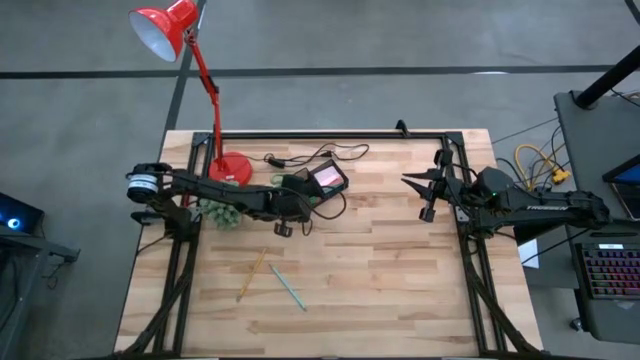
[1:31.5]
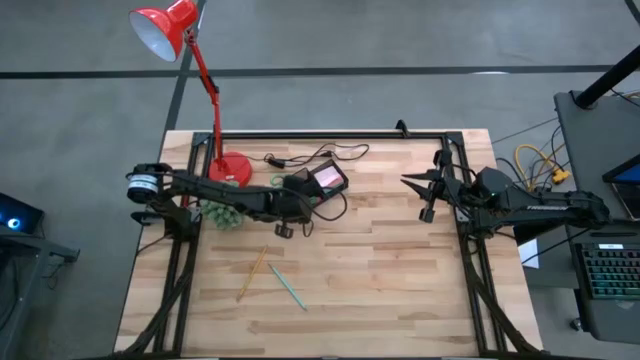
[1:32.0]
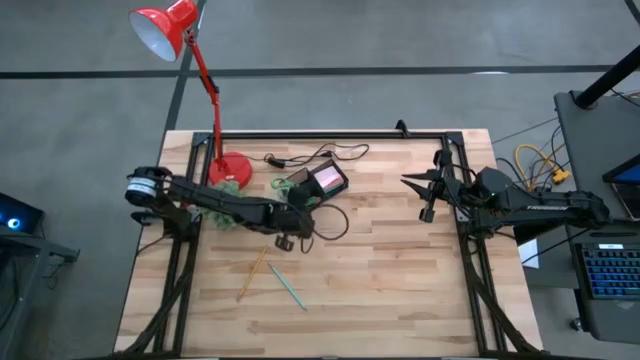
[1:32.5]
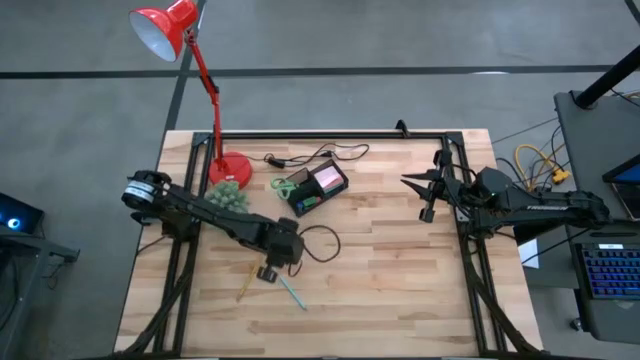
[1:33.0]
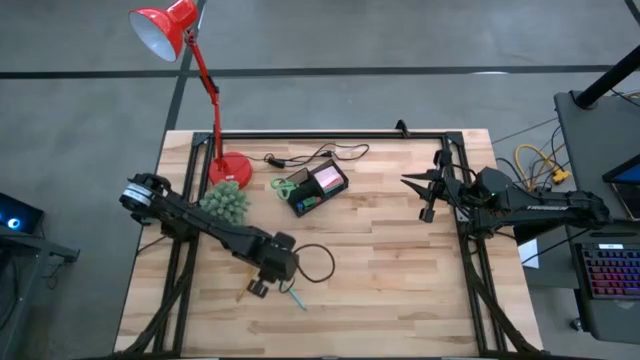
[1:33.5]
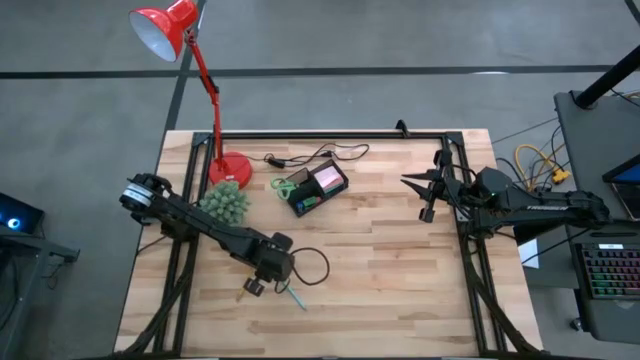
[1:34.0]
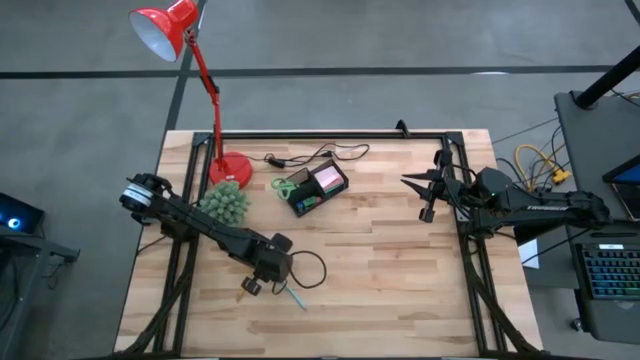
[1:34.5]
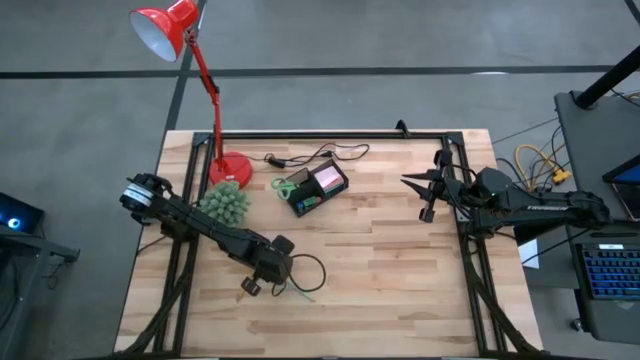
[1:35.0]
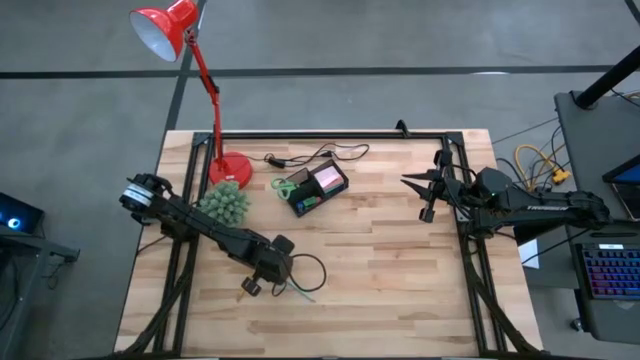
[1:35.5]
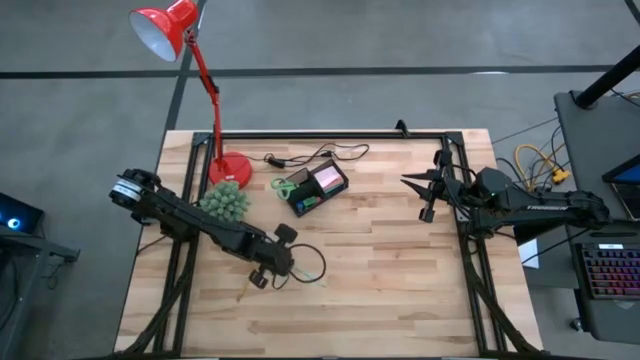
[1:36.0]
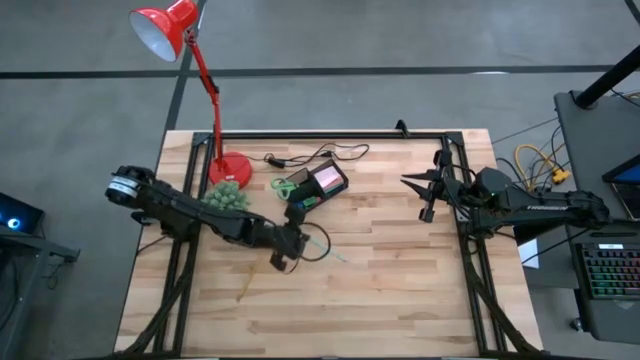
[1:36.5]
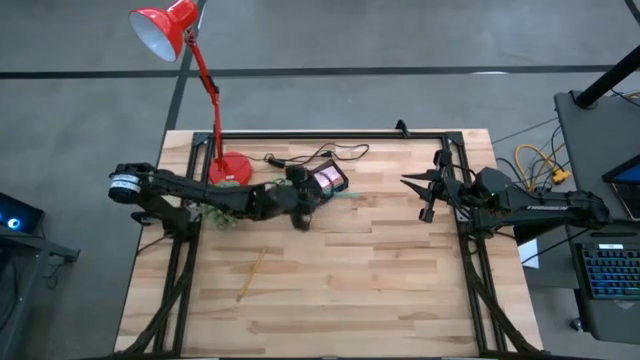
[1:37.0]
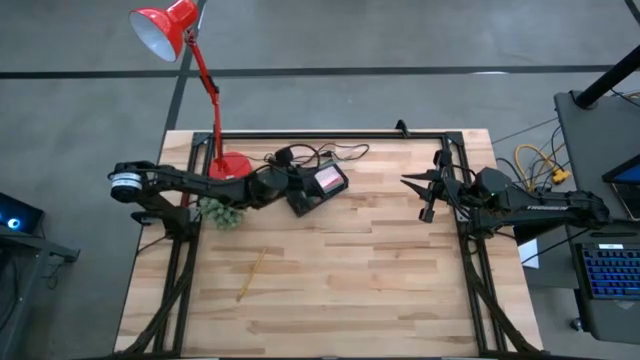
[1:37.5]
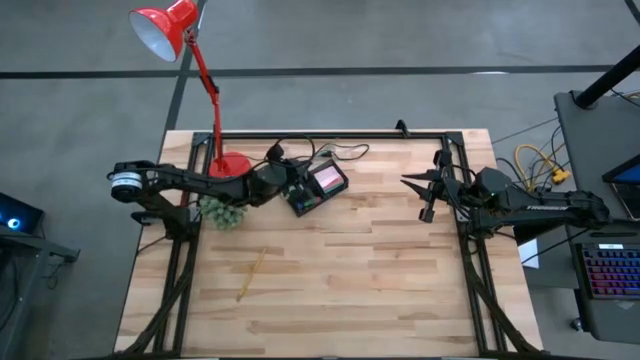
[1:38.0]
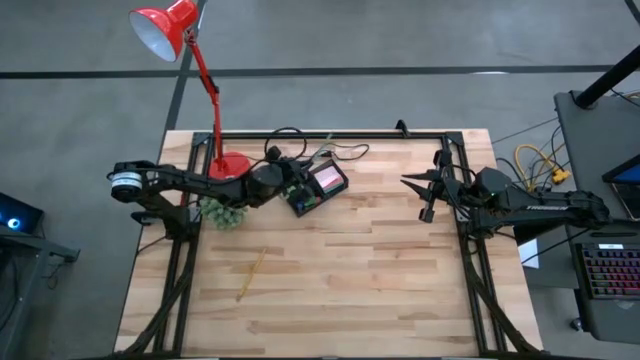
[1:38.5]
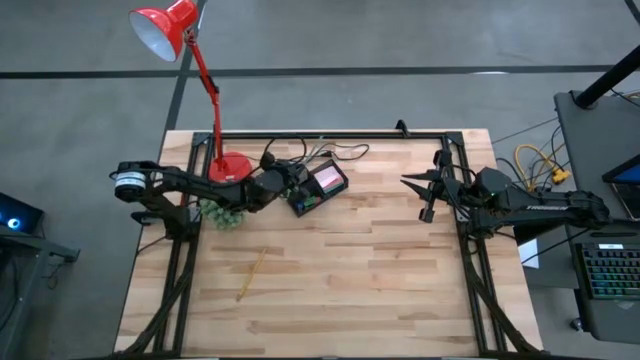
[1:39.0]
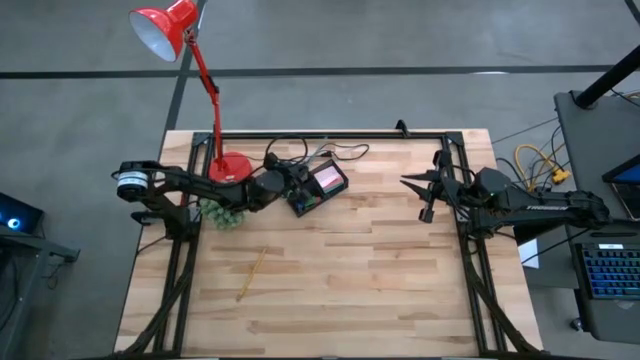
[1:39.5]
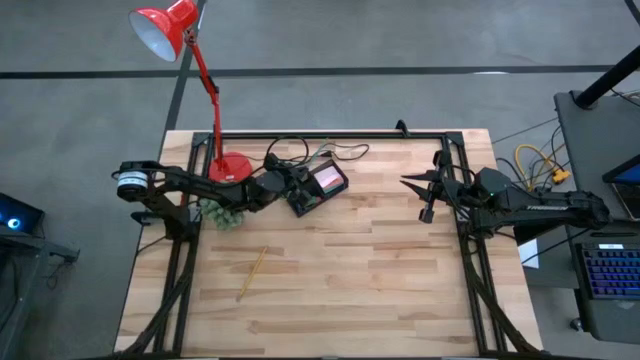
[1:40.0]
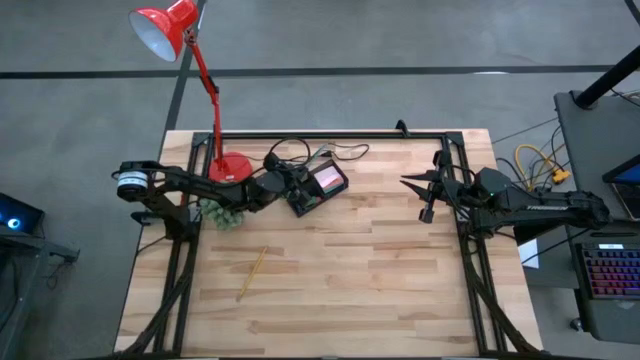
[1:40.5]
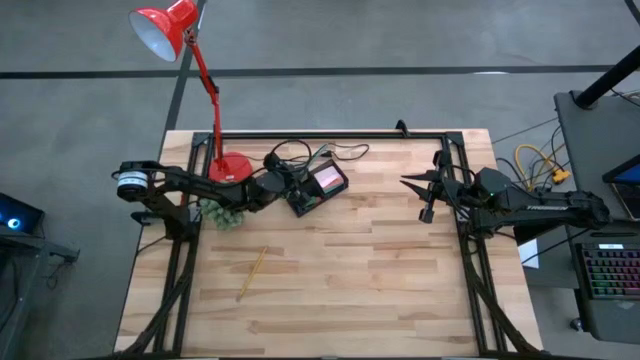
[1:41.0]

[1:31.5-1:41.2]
Task: Pick and place office supplies into organizer
Put the blue pencil into the black desk organizer

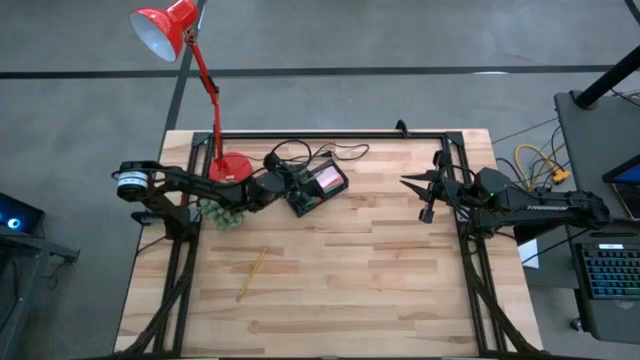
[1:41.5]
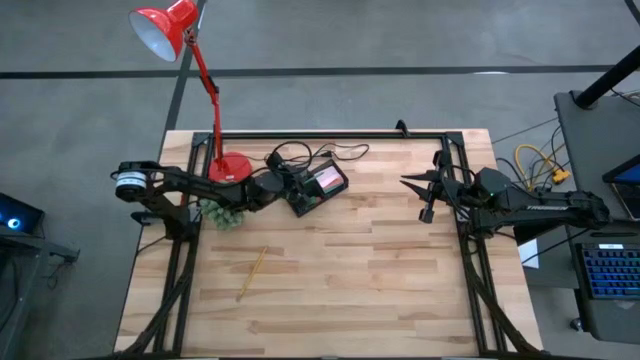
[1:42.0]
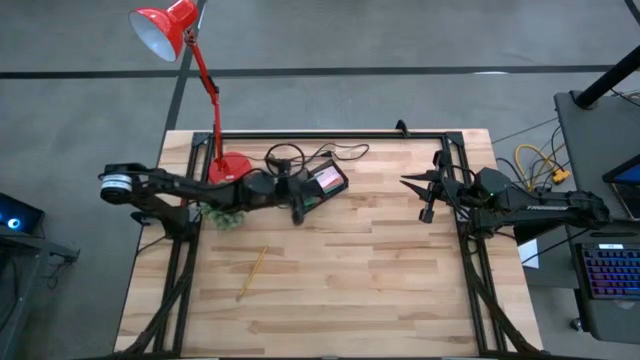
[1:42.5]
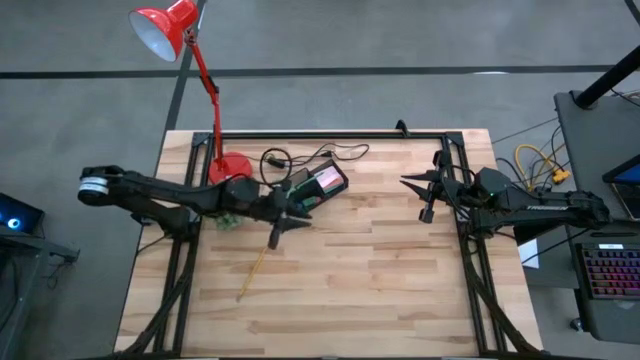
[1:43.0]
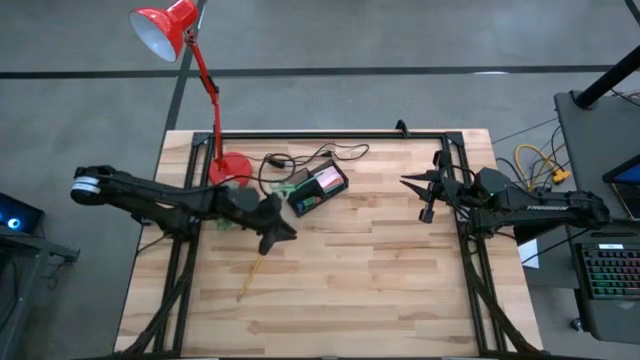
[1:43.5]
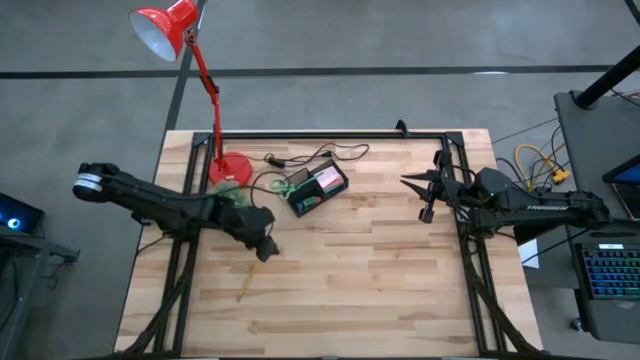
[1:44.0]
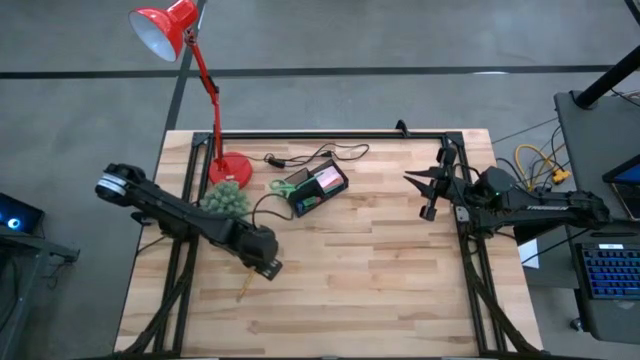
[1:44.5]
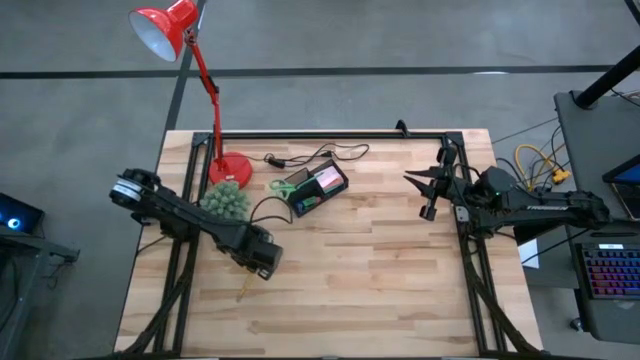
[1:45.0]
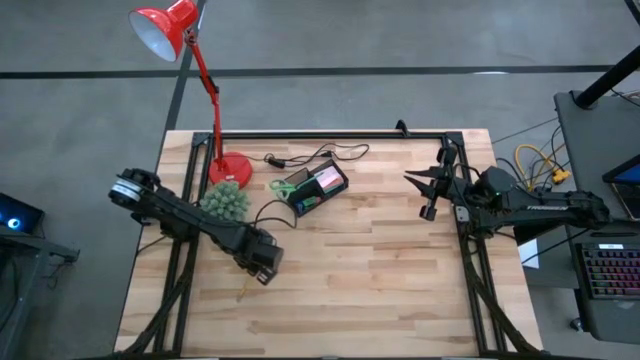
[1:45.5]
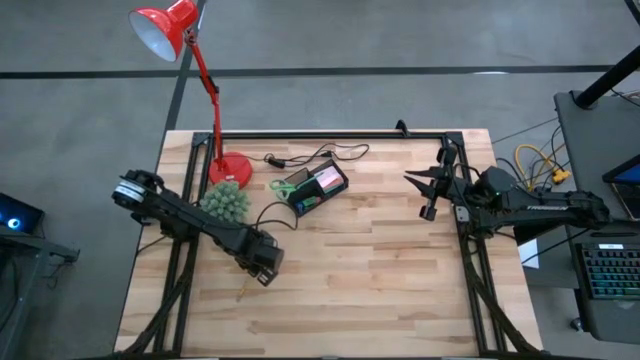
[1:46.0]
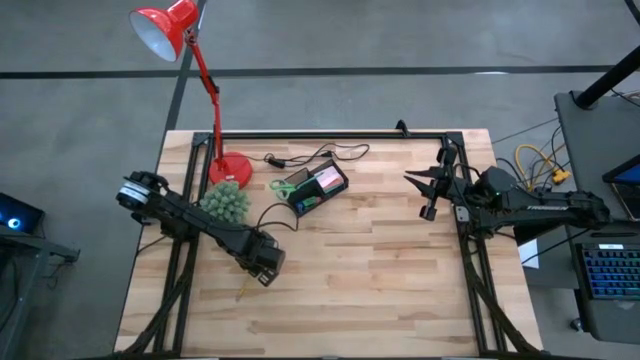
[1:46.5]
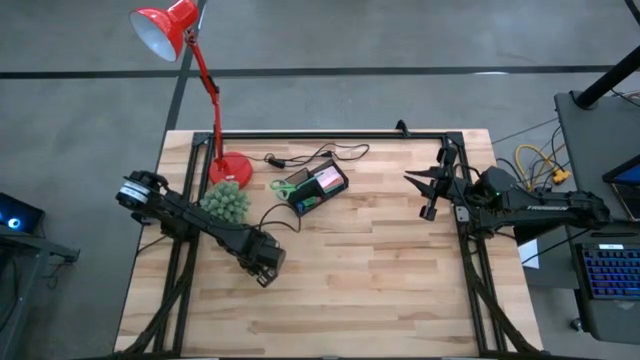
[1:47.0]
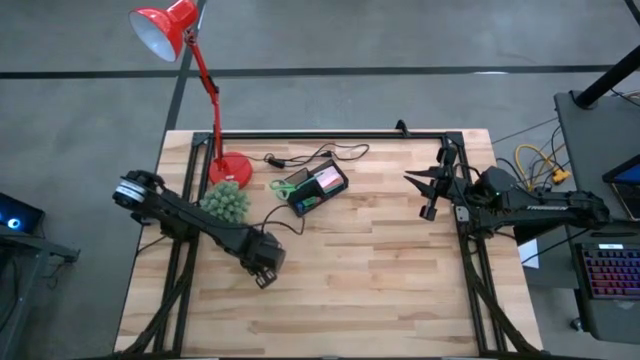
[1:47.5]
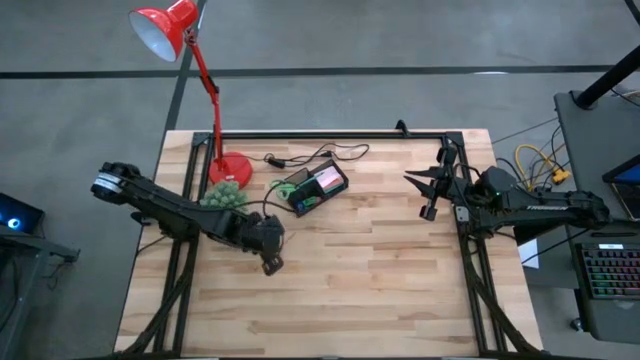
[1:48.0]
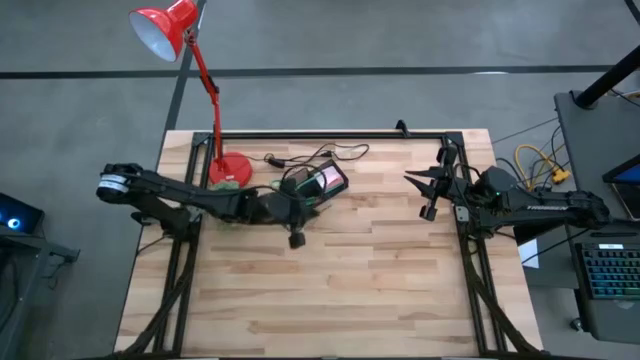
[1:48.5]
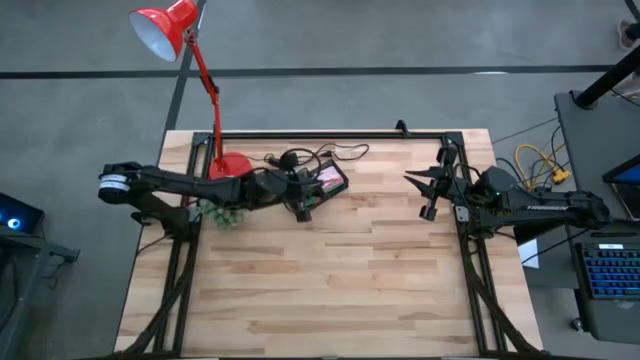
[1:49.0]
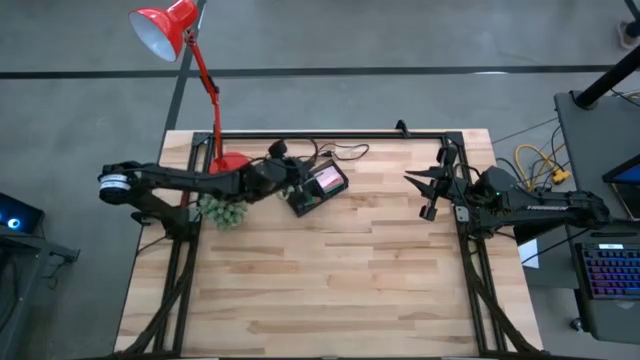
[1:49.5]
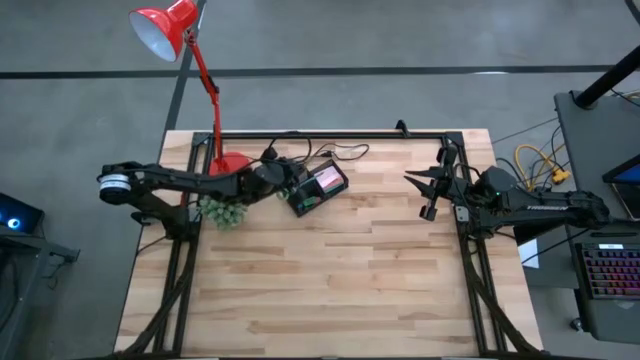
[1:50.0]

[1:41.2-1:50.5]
Put the yellow pencil into the black desk organizer

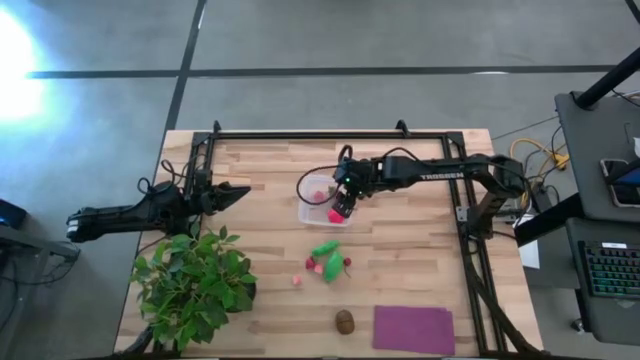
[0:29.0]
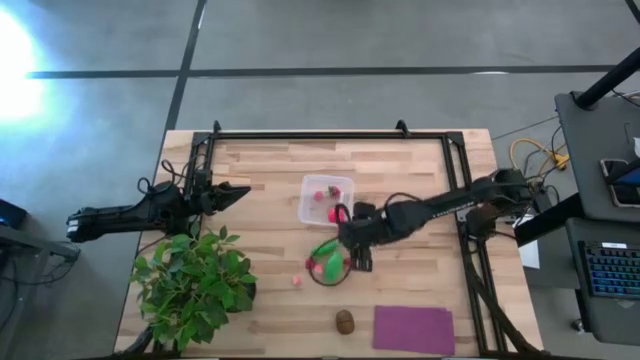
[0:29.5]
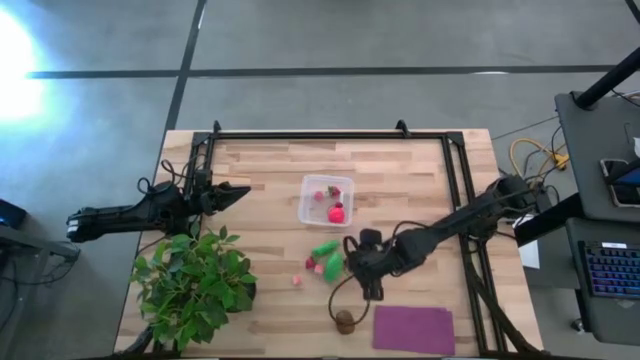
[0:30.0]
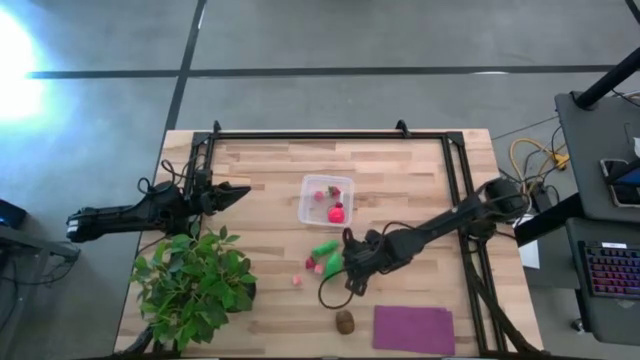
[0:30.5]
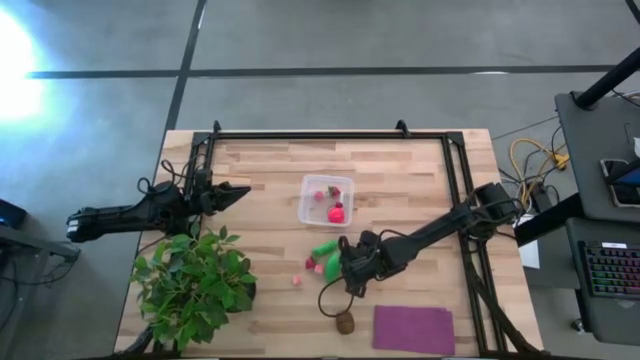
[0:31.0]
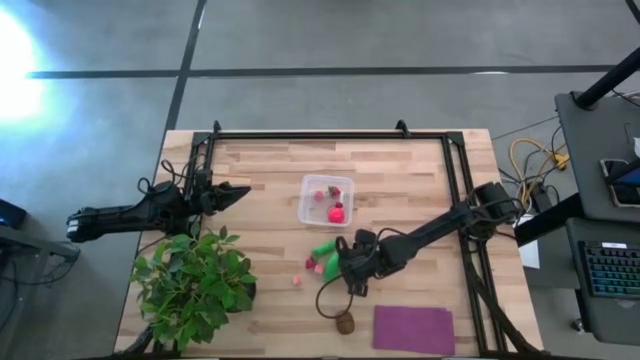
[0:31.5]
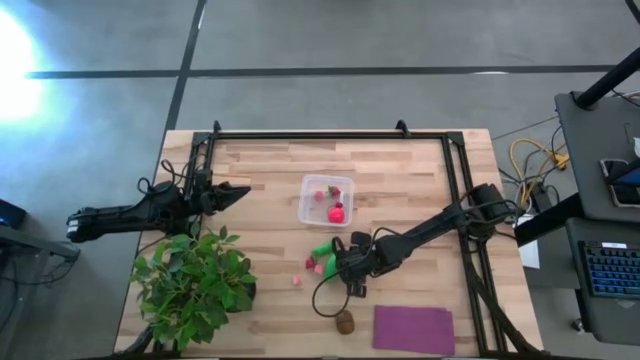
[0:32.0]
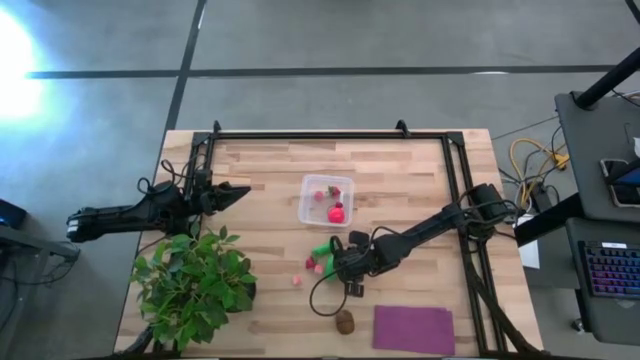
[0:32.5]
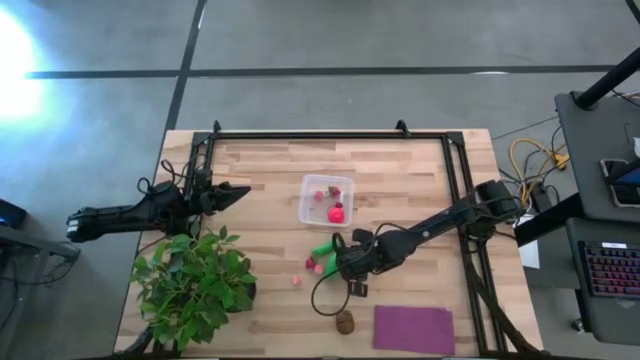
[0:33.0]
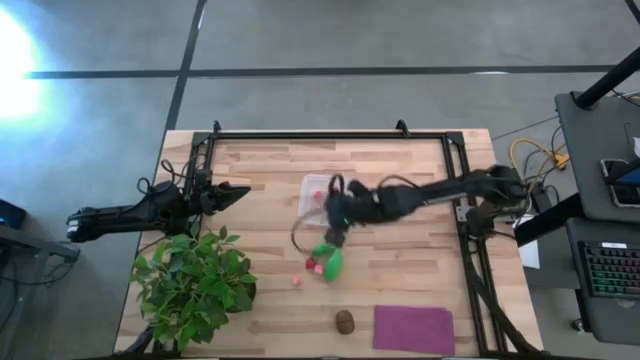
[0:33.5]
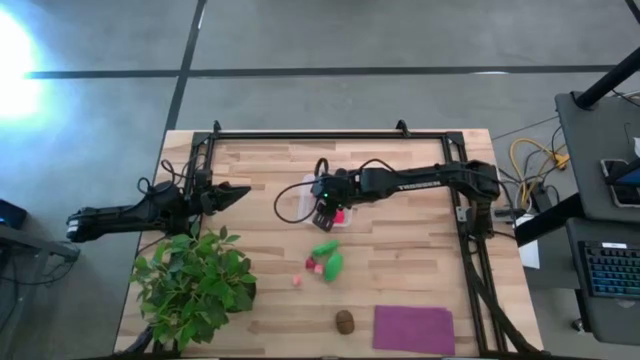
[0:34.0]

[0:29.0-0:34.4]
Task: Pick and placing Produce into tupperware
Put the red cherry into the transparent bin
